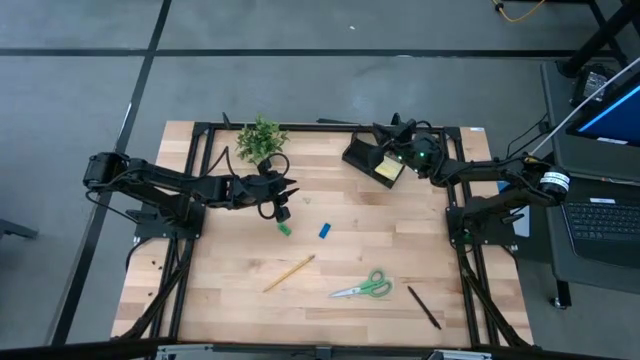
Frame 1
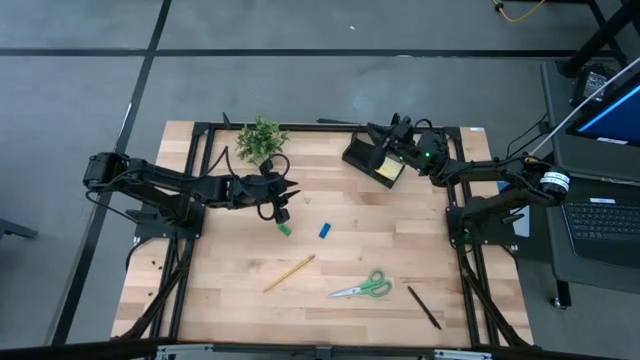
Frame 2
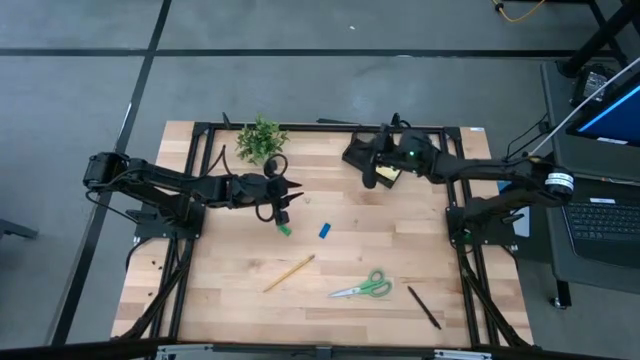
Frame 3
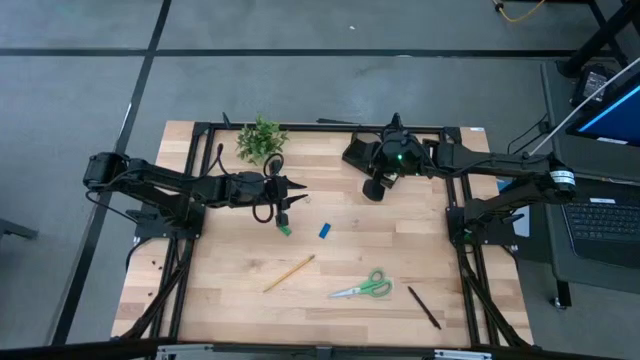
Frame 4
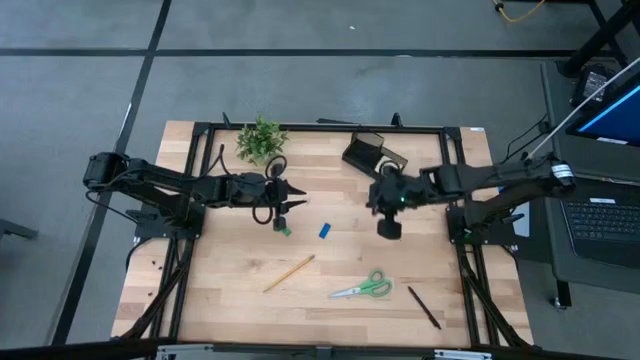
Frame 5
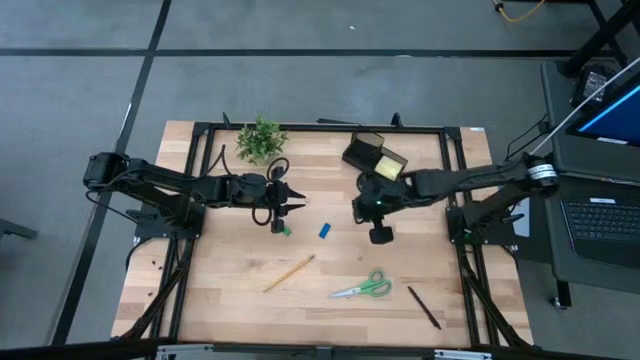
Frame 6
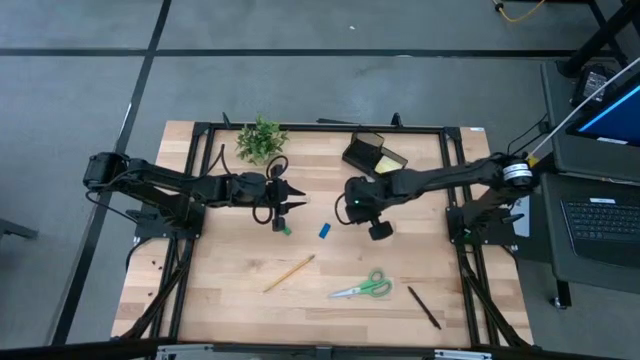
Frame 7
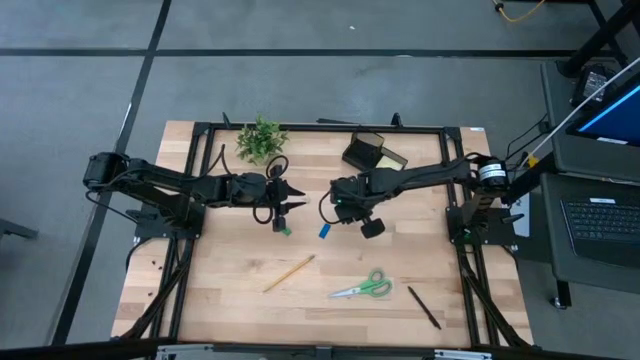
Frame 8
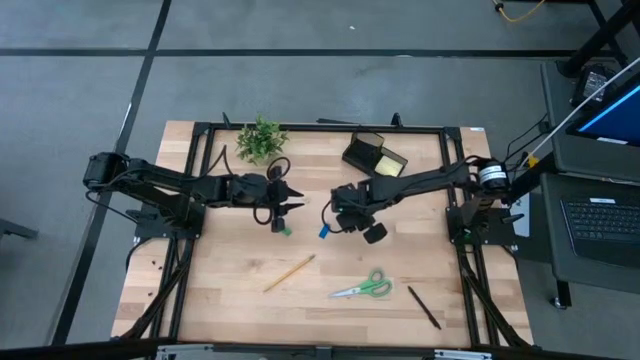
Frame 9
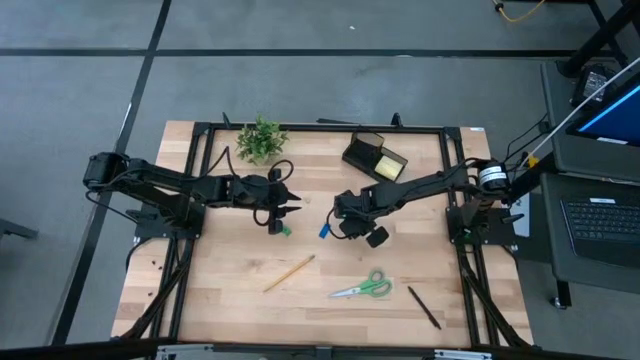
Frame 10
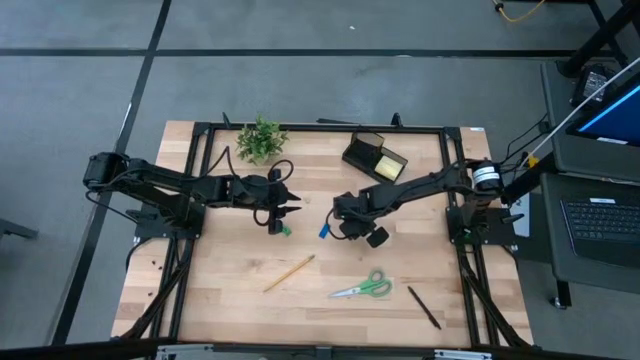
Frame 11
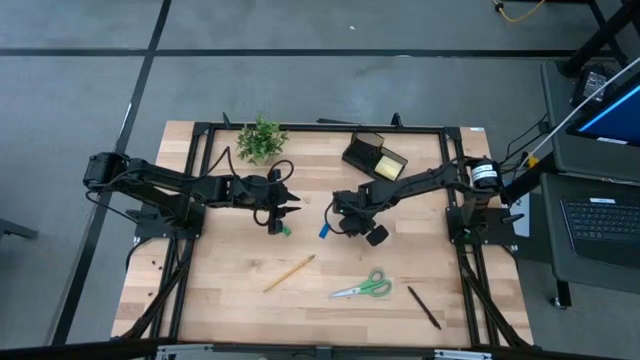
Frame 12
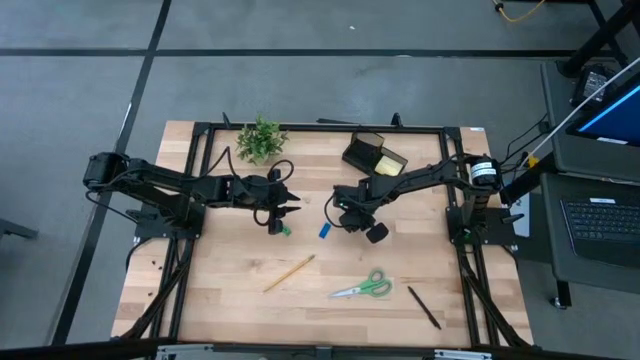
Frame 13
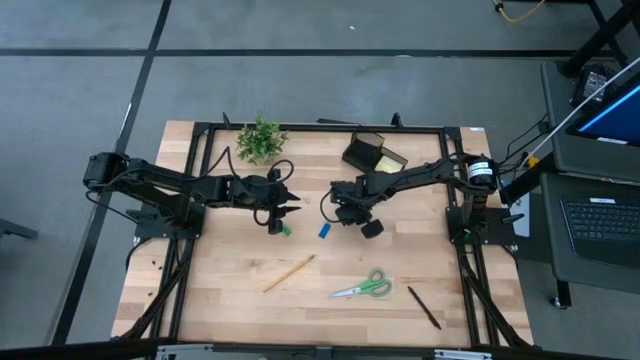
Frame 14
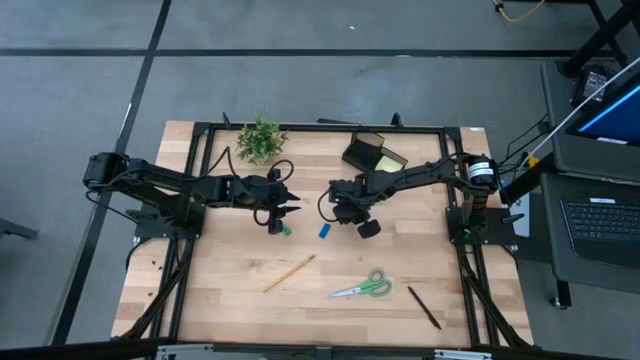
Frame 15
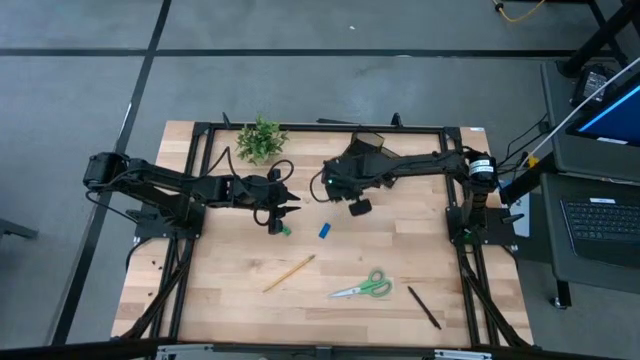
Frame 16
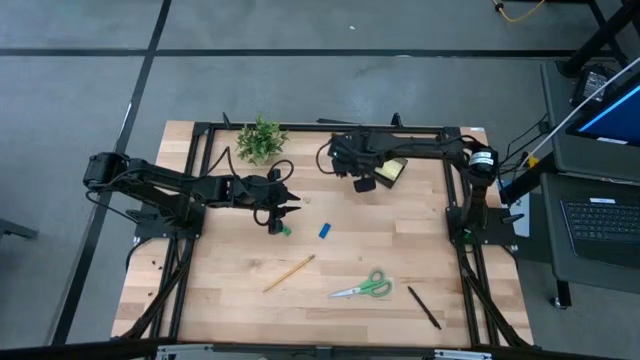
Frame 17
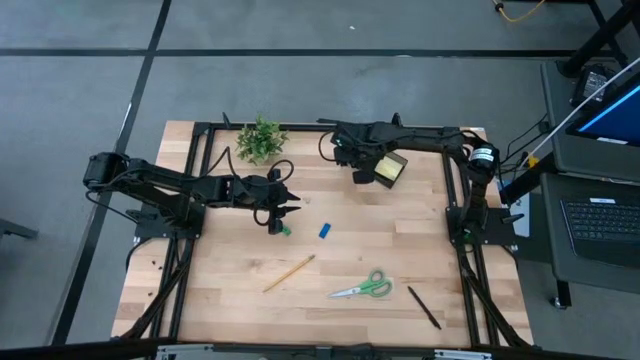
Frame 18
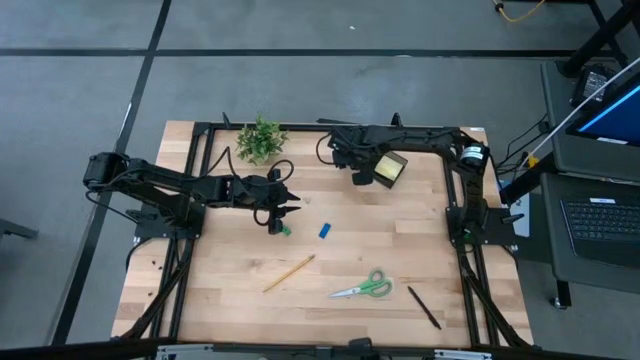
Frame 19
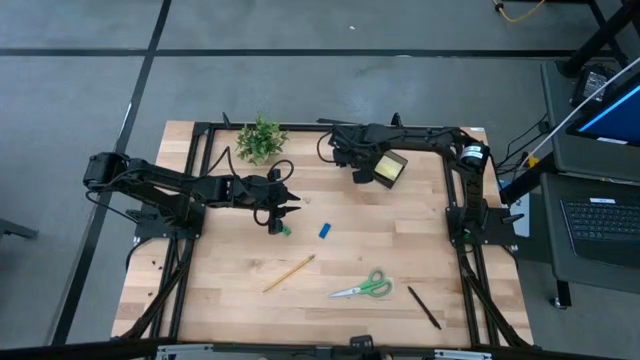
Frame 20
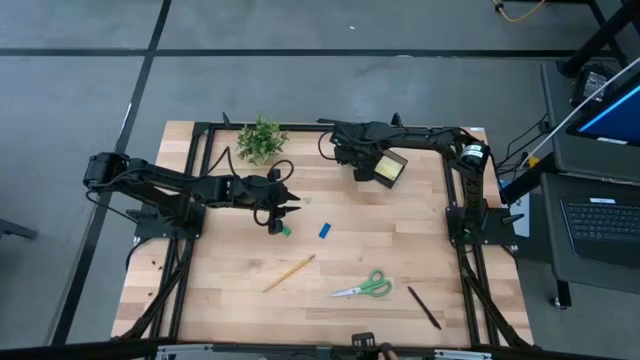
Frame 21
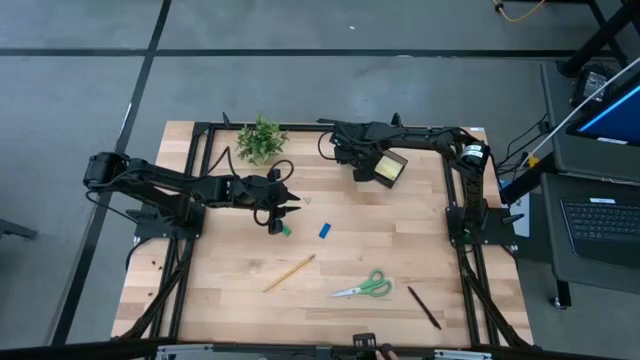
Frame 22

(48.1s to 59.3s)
Task: Pick and place office supplies into organizer
Put the right brown binder clip into the black desk organizer

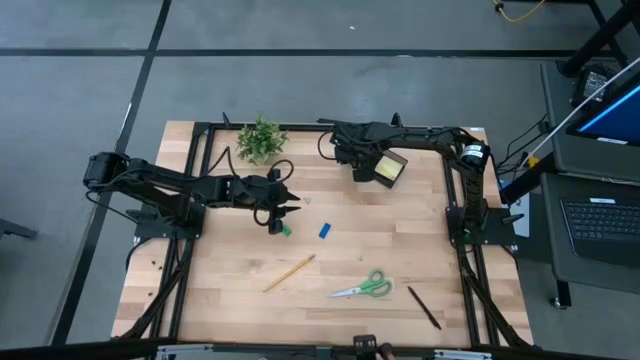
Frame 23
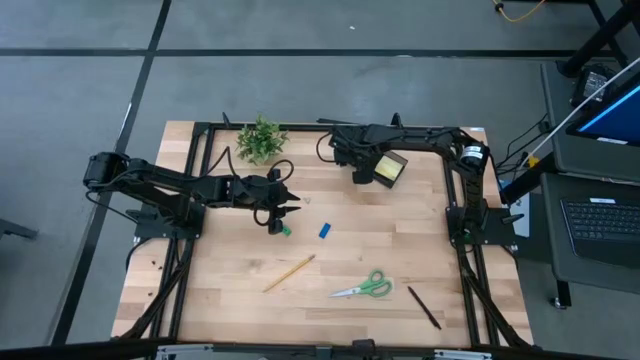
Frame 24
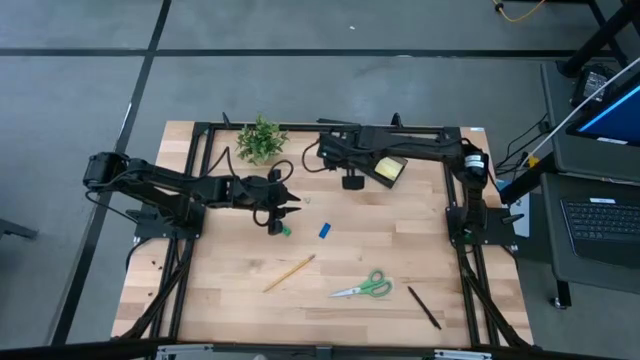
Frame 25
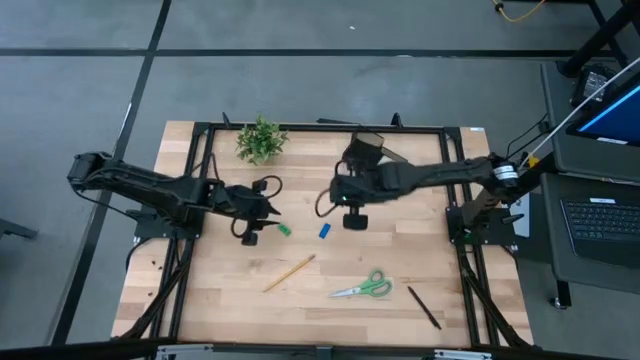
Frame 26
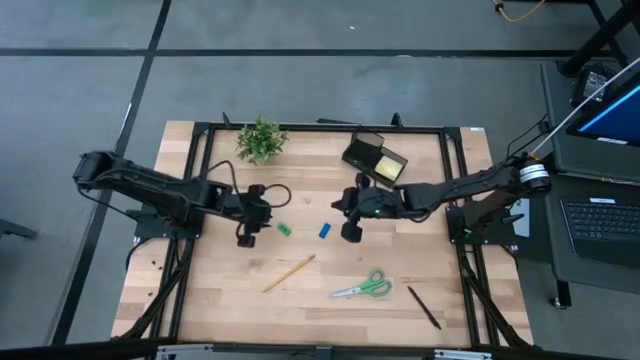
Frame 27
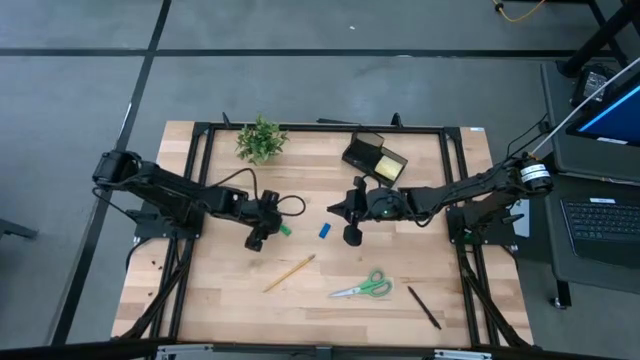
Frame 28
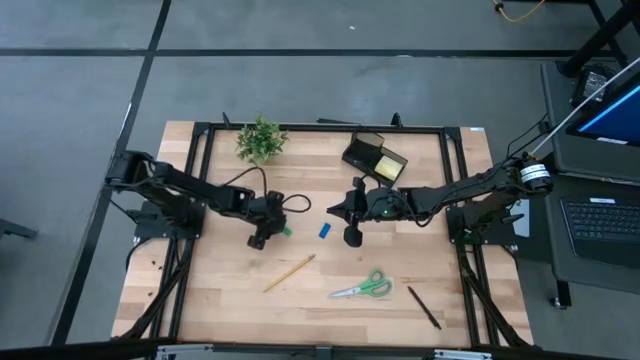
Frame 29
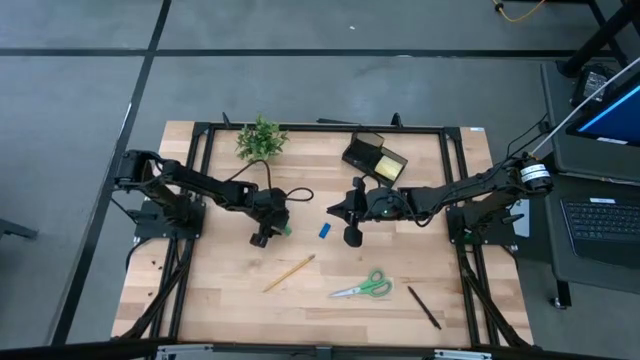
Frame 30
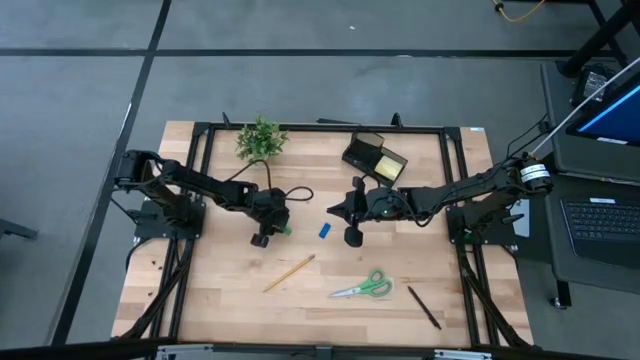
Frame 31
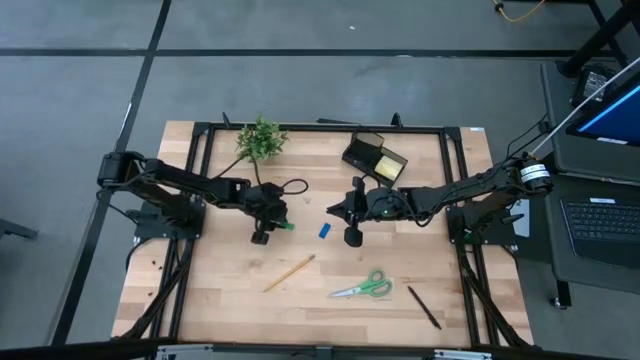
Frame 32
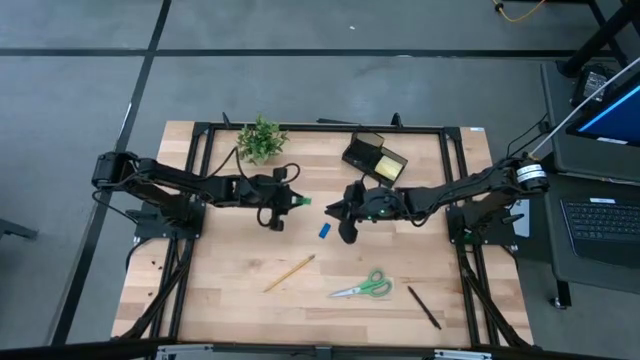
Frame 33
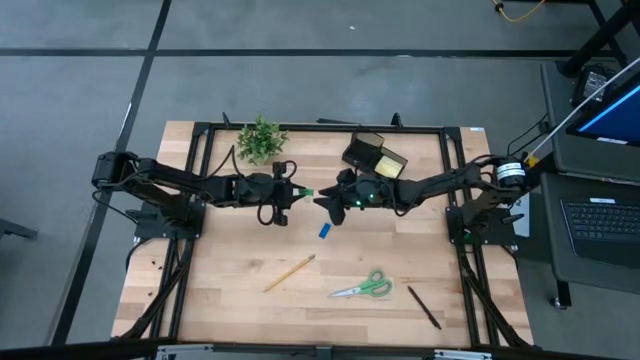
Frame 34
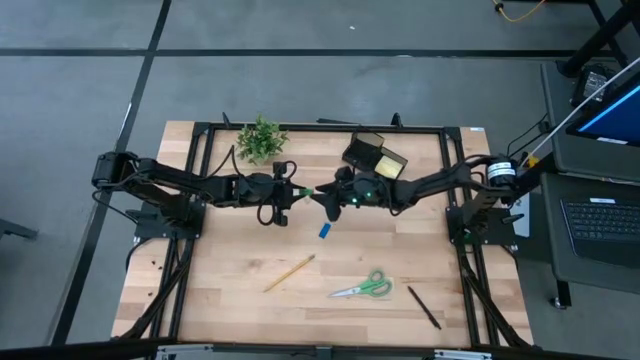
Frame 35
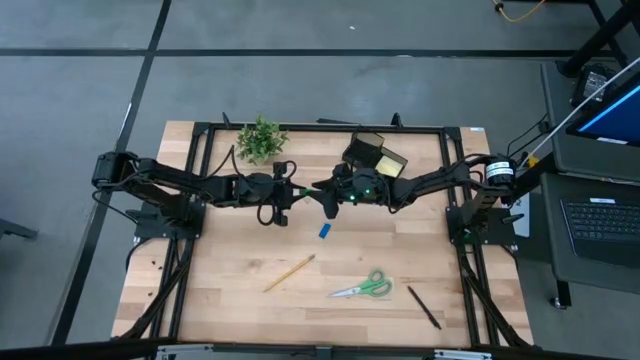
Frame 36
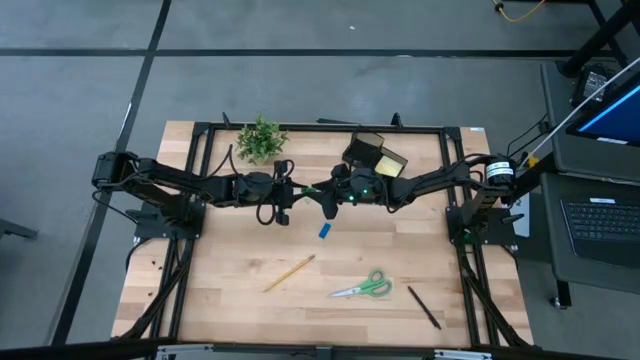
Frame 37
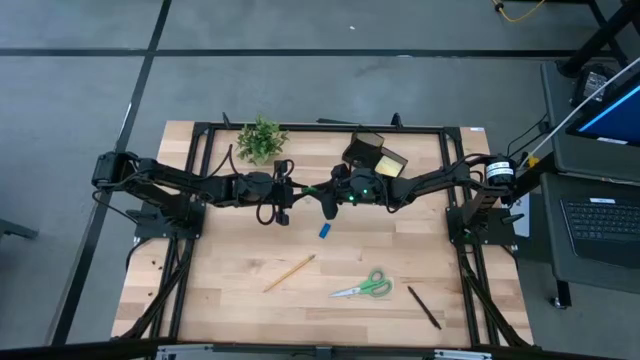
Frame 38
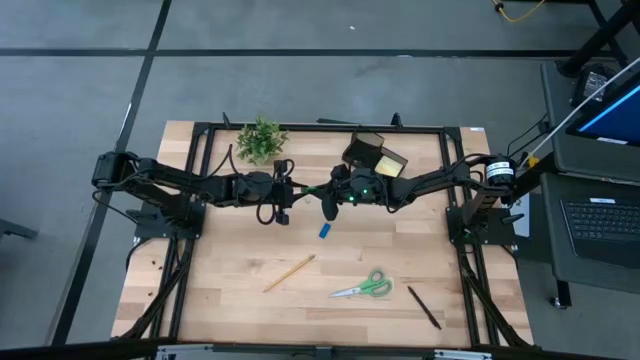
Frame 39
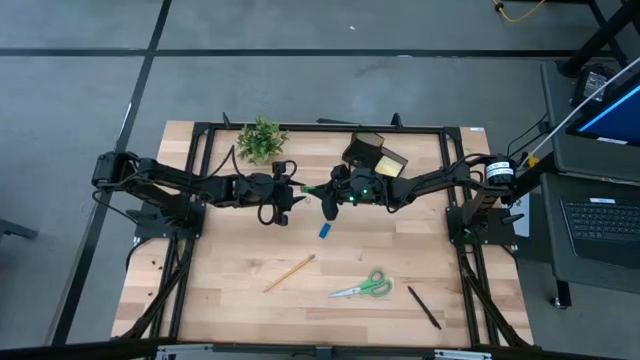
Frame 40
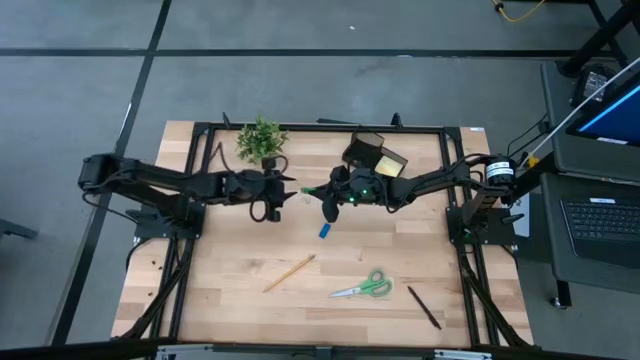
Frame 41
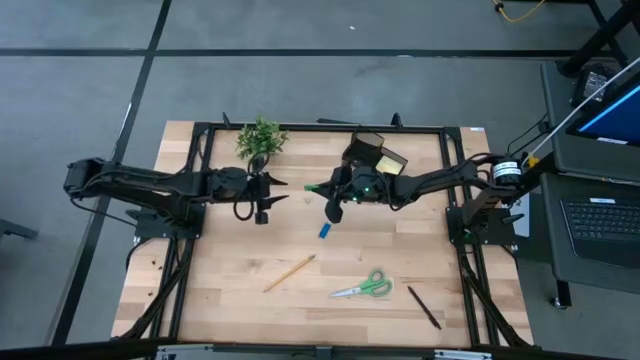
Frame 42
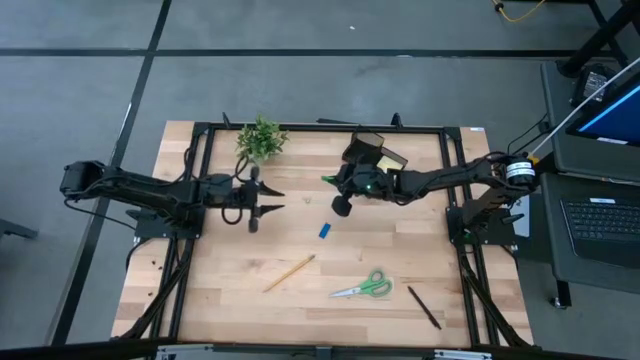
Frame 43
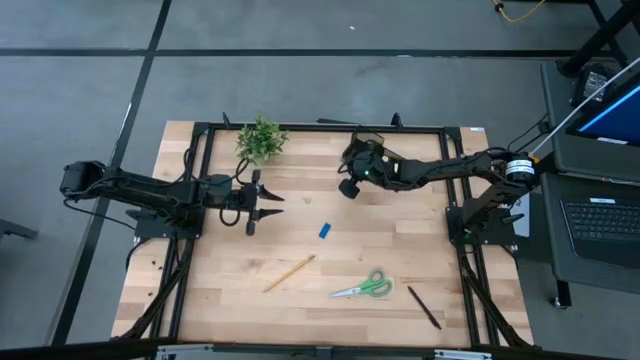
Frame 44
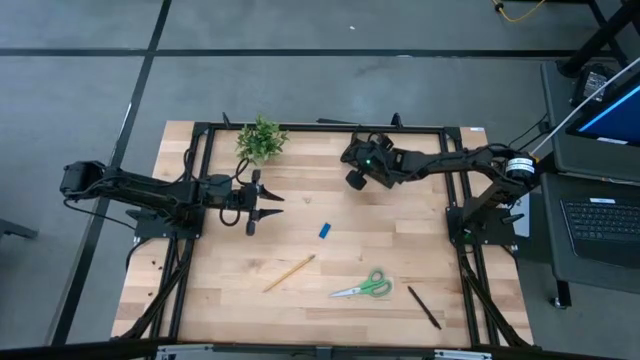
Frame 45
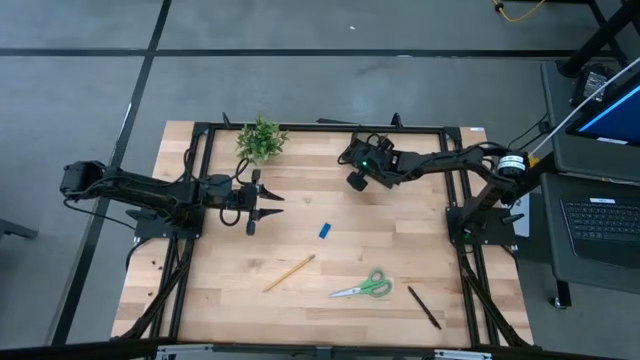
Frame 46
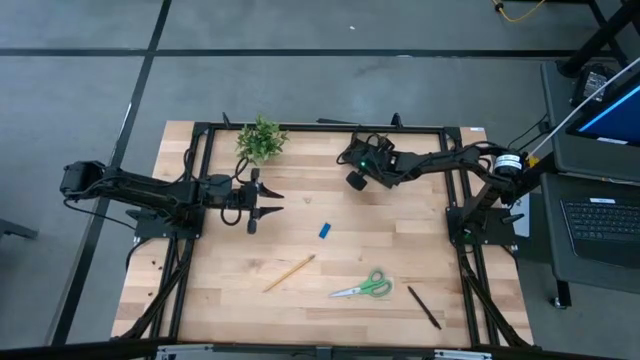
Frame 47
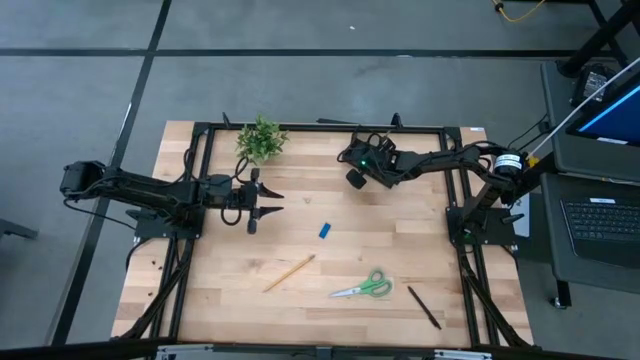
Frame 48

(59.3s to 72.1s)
Put the green eraser into the black desk organizer
